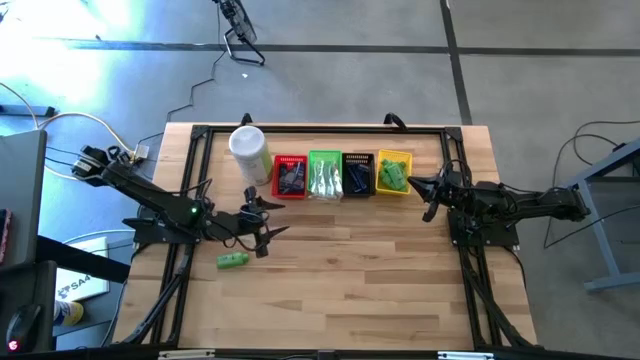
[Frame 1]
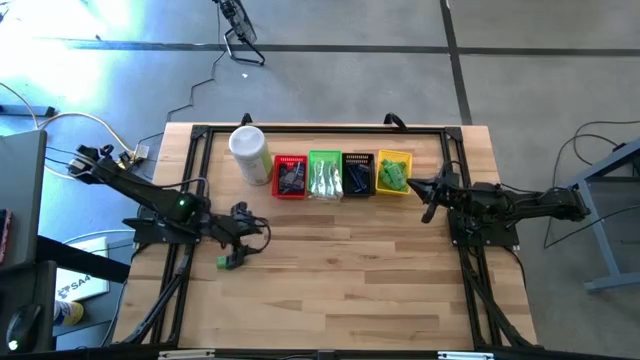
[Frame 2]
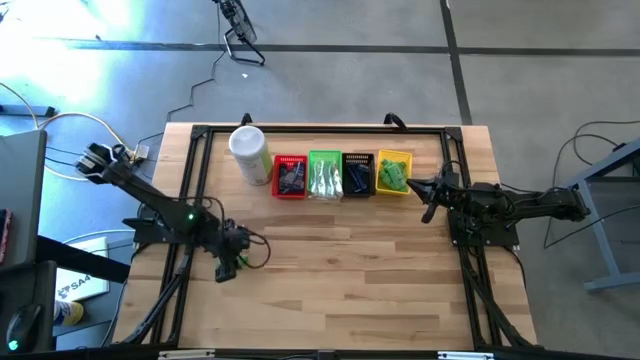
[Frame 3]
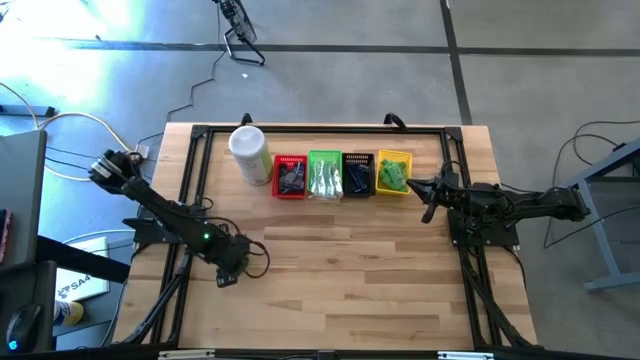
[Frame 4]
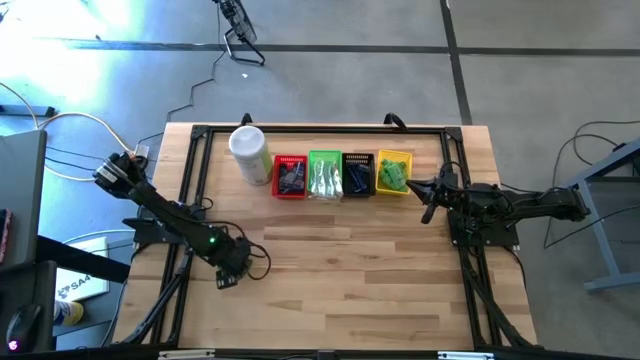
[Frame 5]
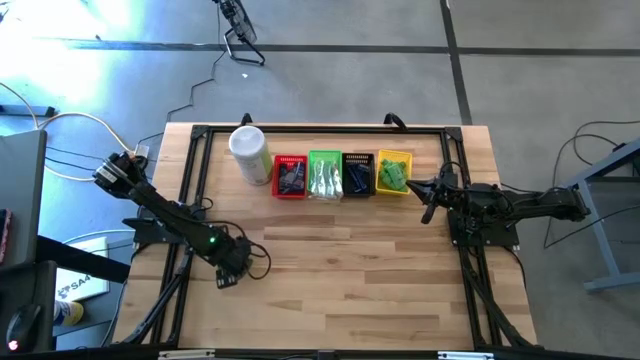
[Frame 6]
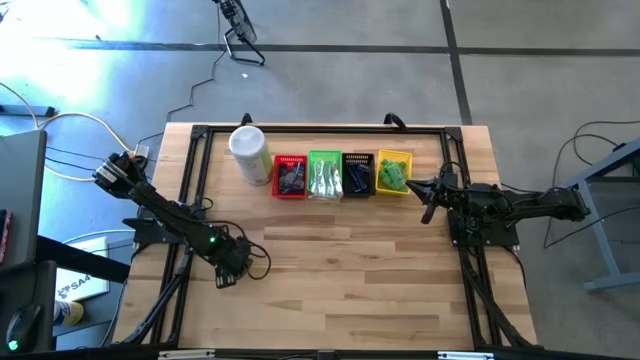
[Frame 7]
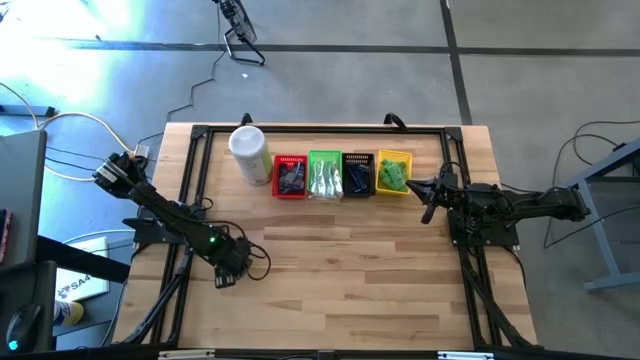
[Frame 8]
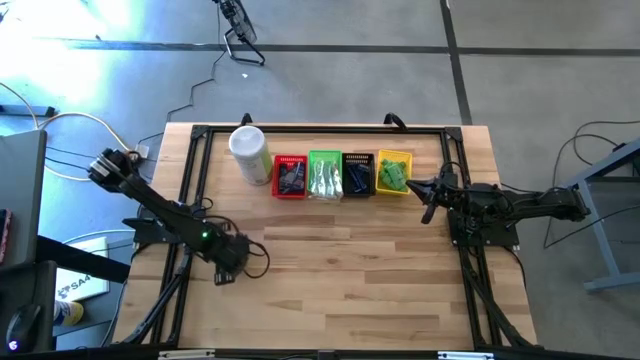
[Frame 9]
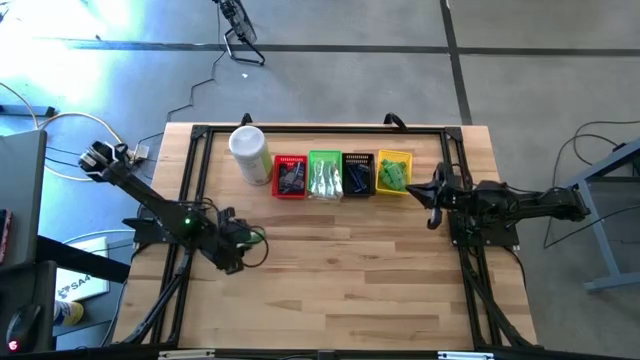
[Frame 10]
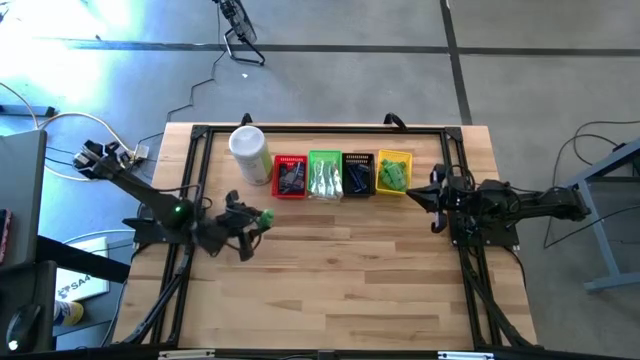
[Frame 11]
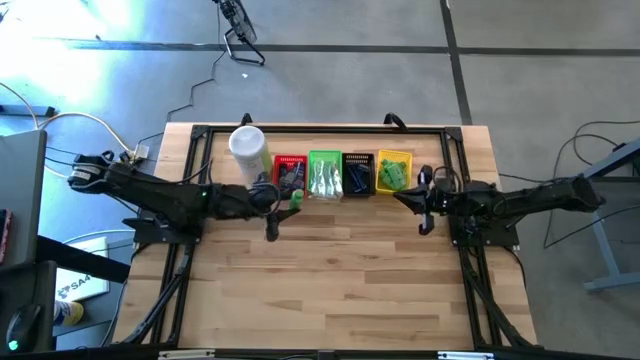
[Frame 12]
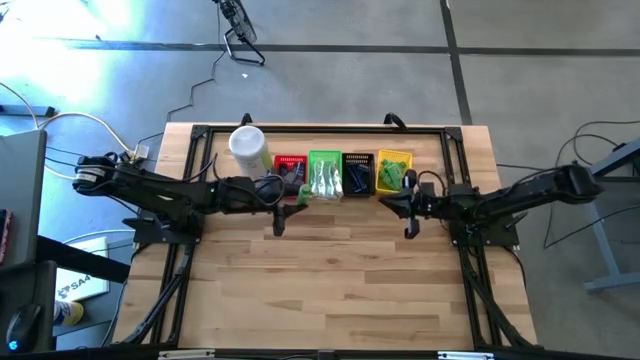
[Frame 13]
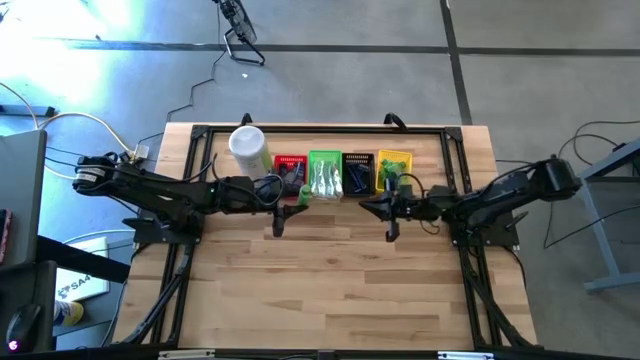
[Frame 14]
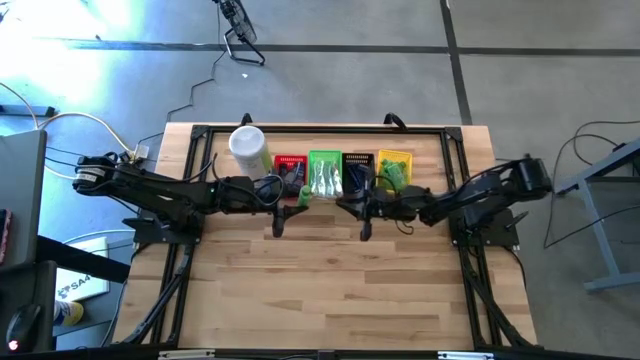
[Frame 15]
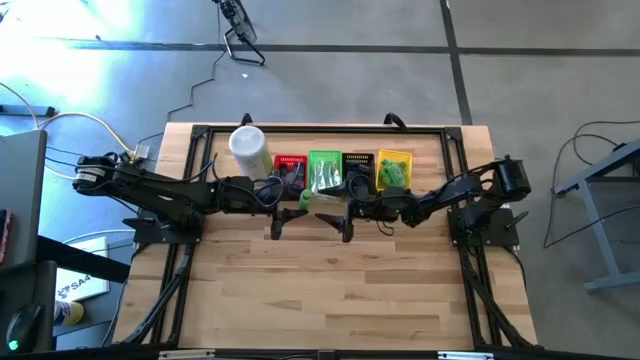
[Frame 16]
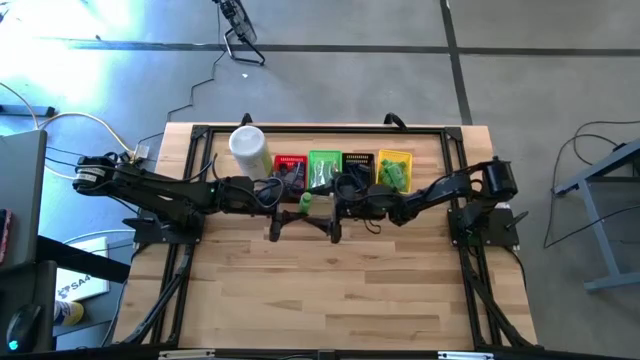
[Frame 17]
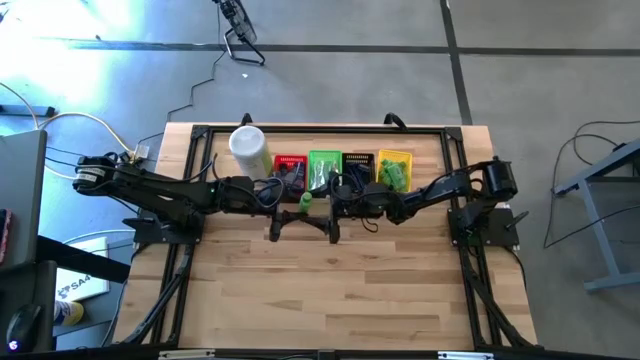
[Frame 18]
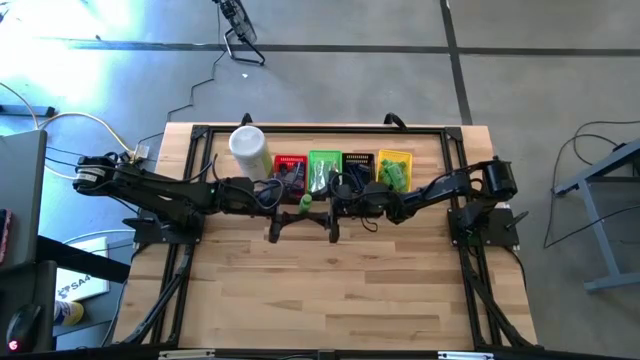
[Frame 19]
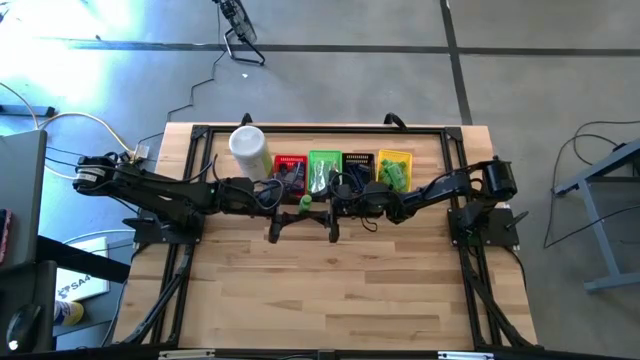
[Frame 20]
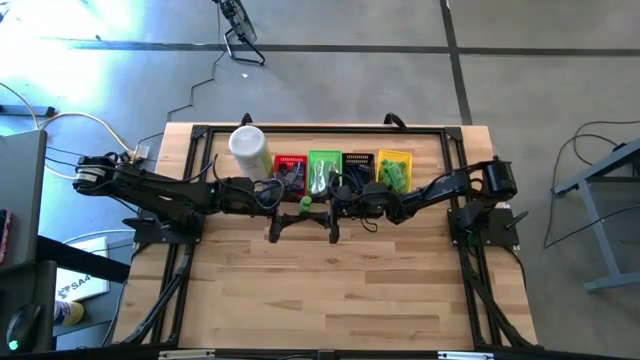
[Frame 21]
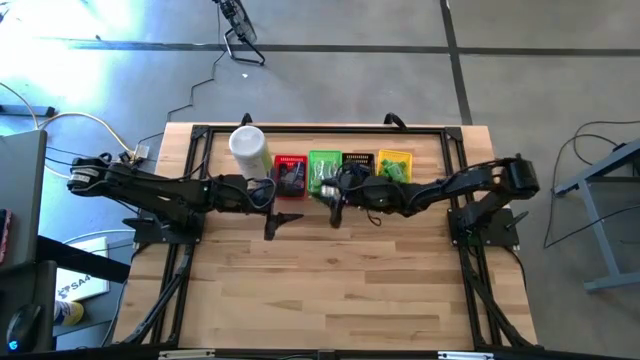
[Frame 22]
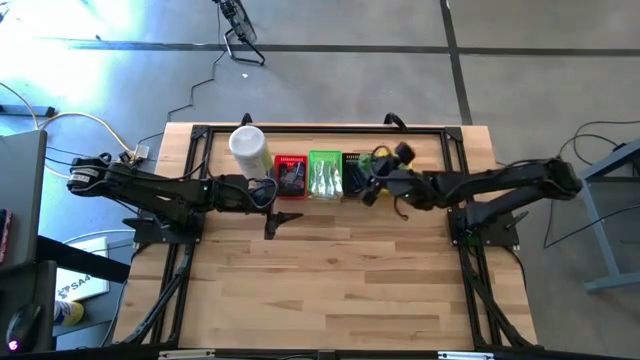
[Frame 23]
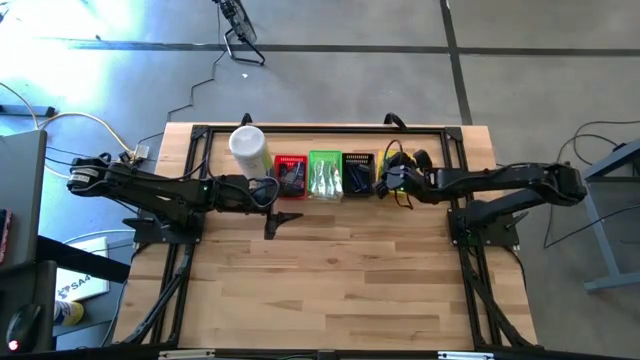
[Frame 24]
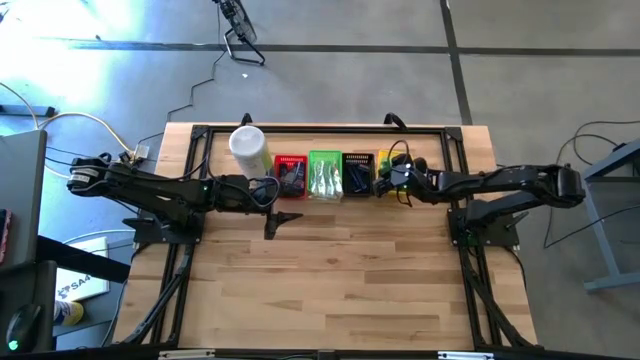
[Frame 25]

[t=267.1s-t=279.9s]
Task: Pick & Place Travel size toiletries
Put the green shampoo into the yellow bin

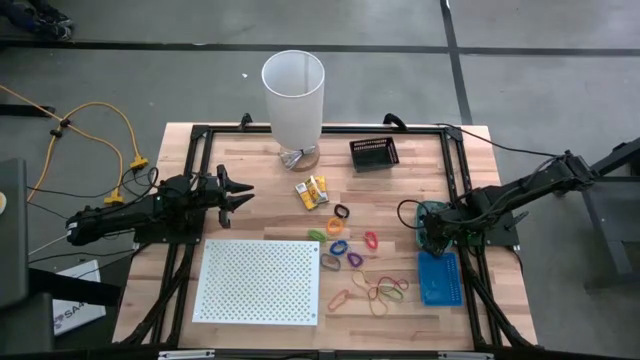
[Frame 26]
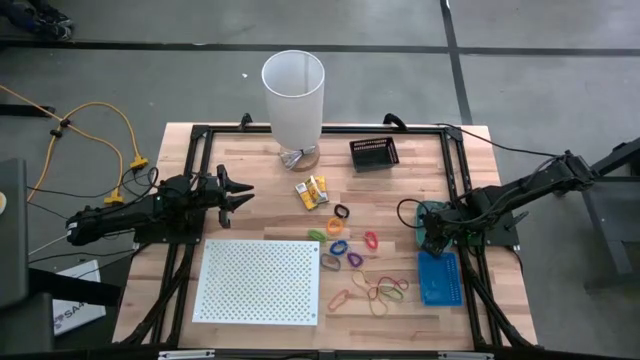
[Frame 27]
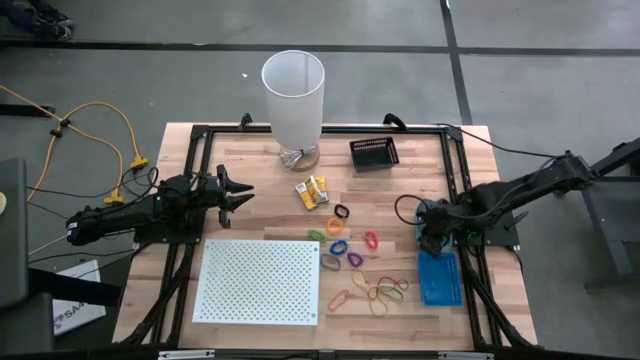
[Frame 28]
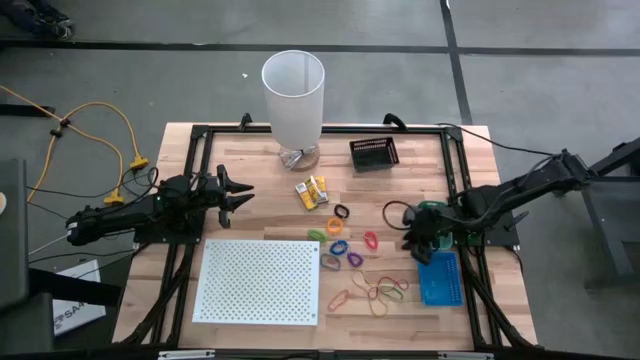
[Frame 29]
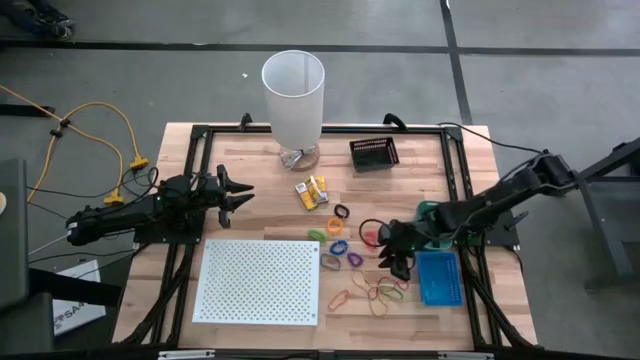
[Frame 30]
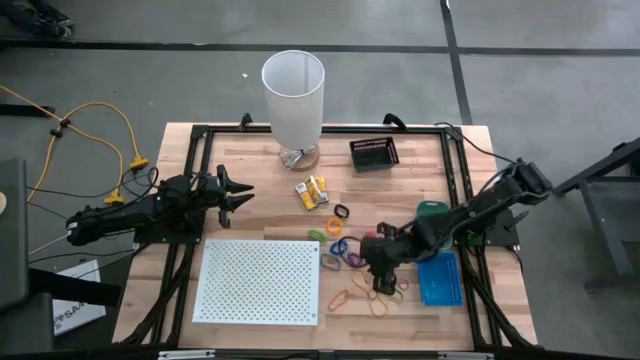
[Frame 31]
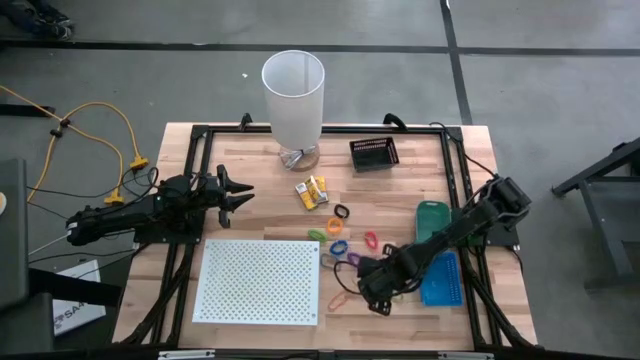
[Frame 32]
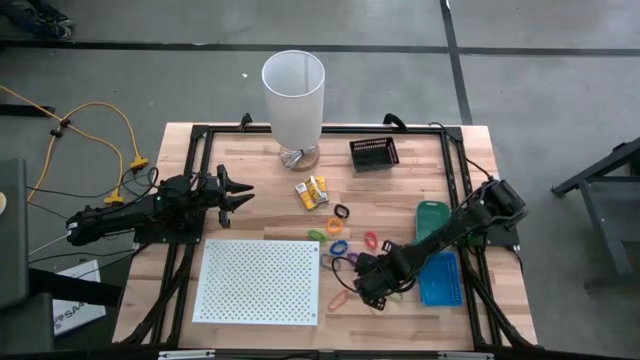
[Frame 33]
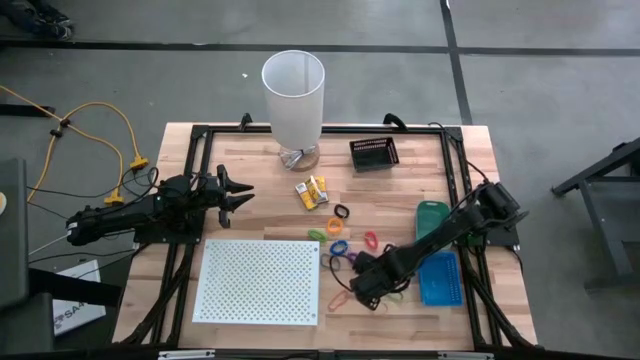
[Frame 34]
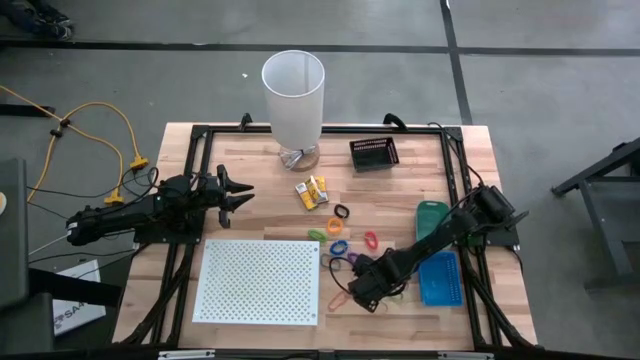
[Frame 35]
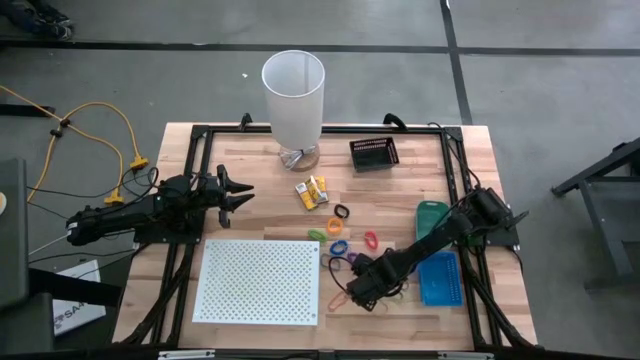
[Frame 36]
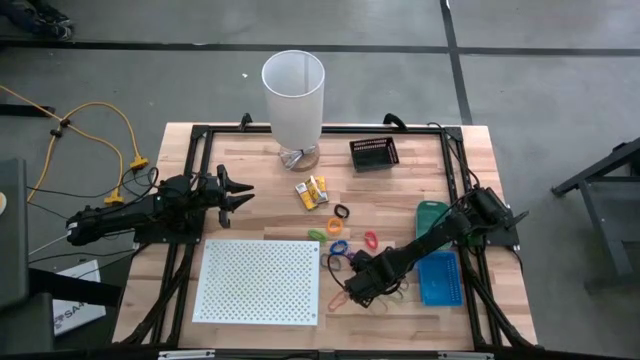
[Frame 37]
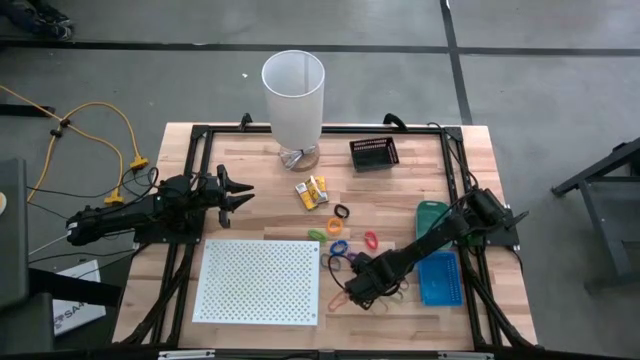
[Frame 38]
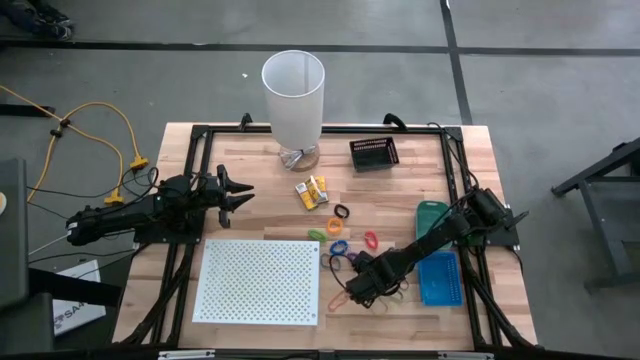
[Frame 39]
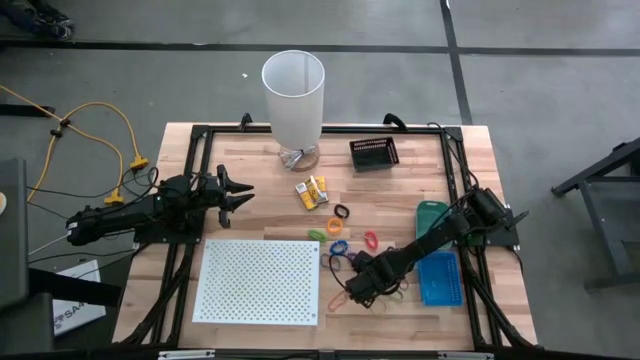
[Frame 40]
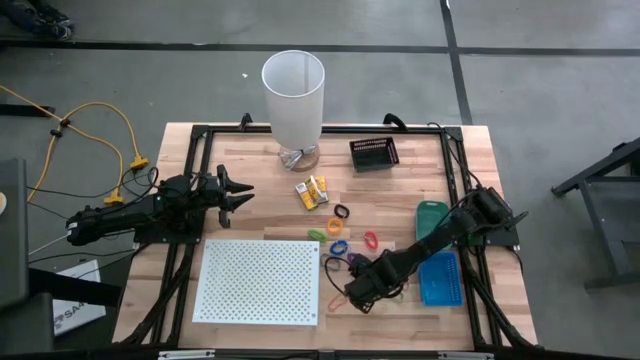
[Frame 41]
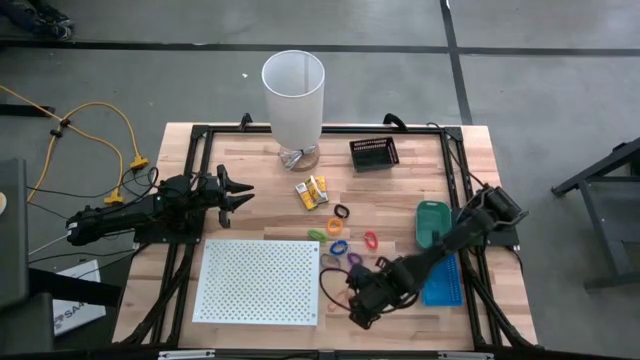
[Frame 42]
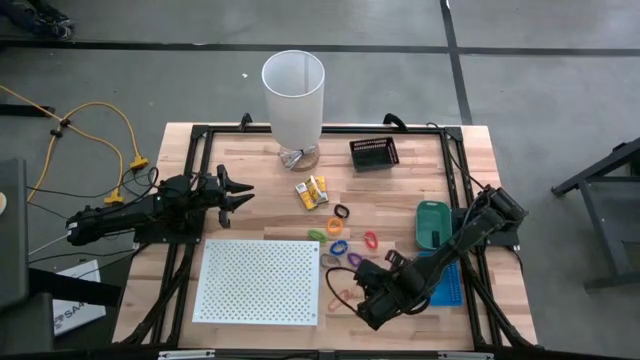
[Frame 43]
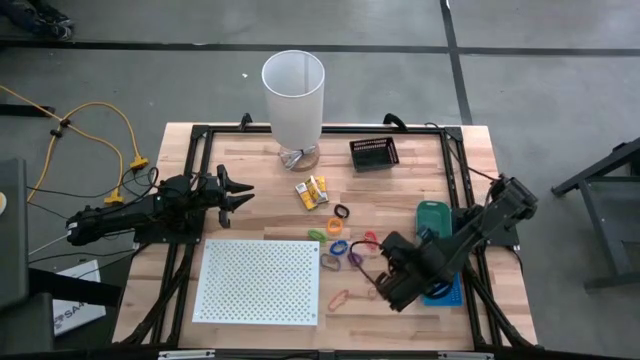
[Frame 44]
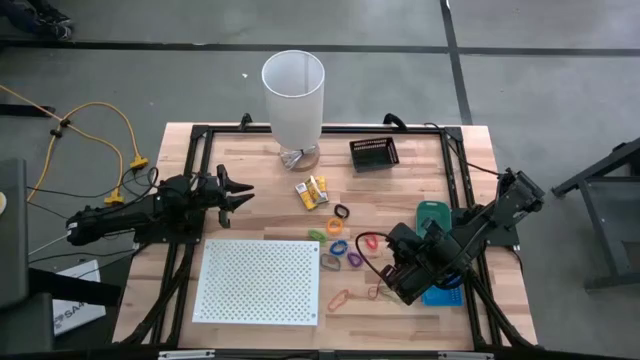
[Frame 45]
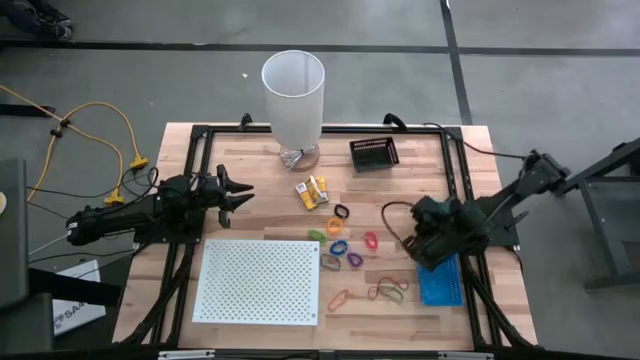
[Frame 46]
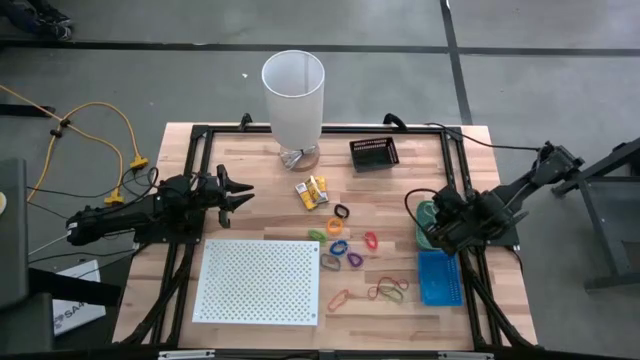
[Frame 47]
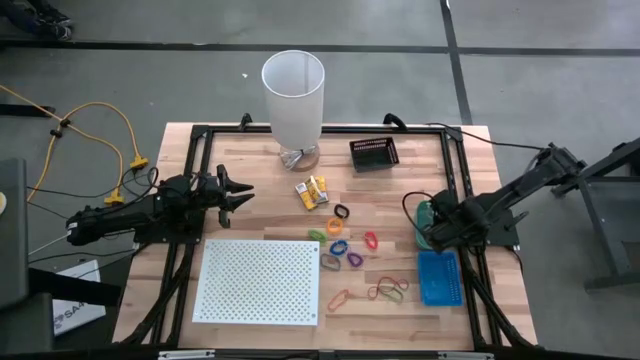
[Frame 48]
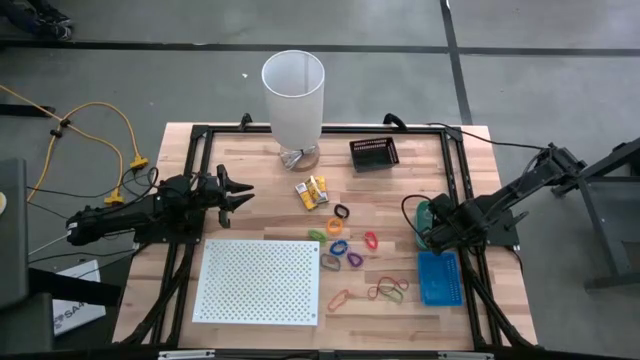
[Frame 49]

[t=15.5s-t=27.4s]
Task: Pick & Place Office Desk Supplies
Put the yellow rubber band into the green bin
